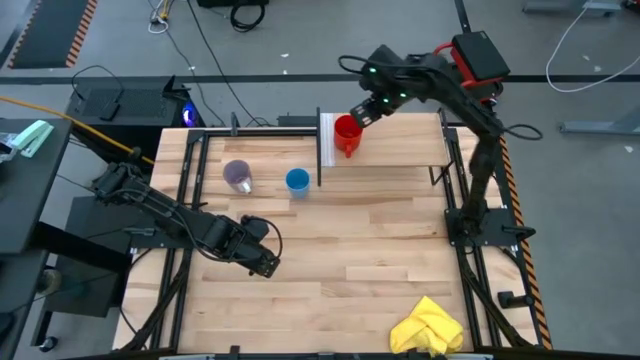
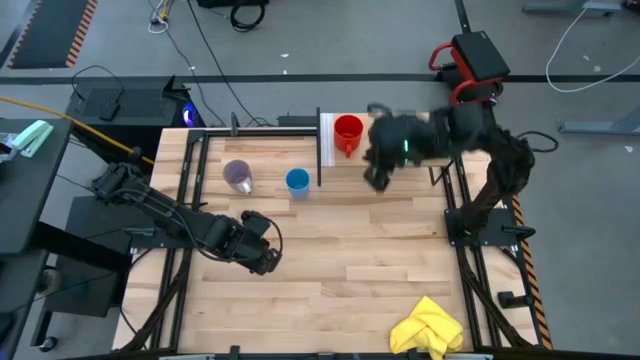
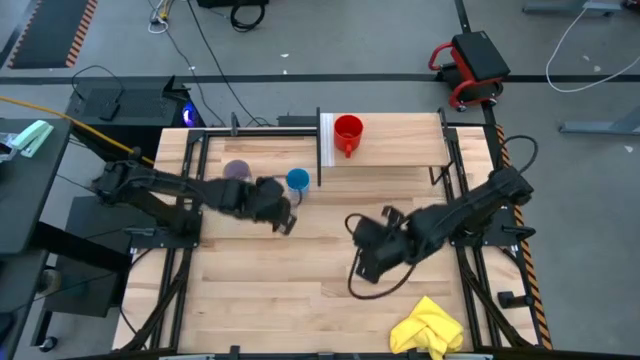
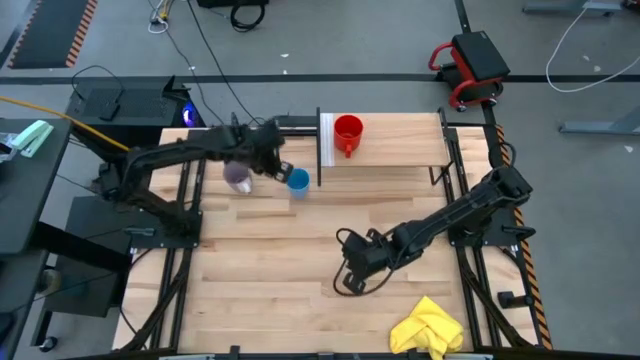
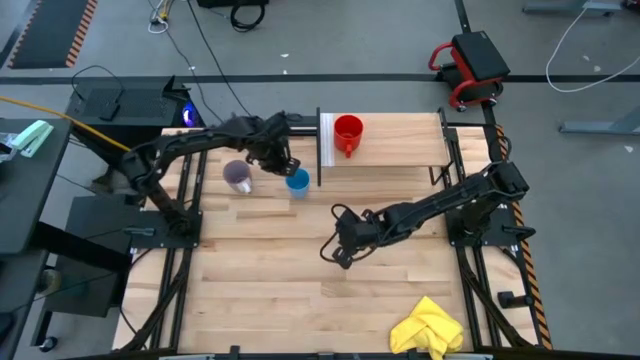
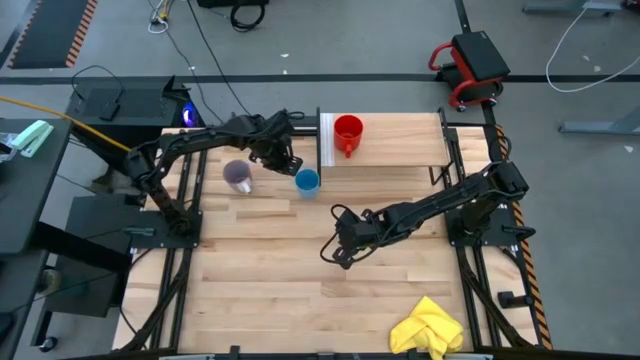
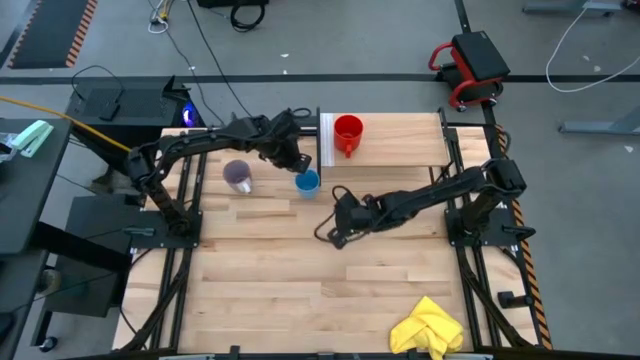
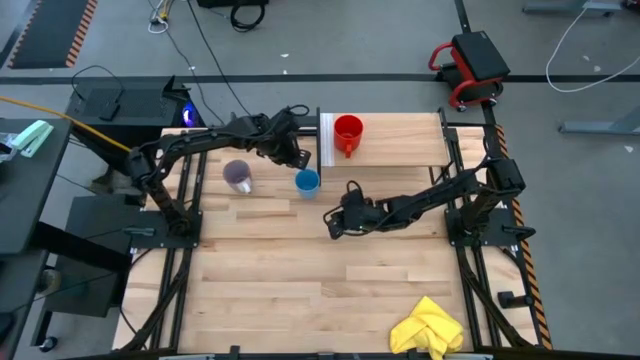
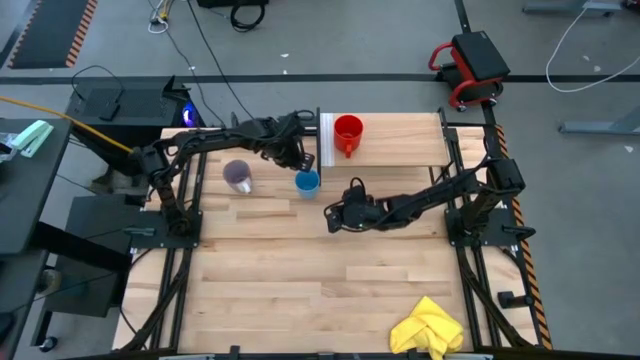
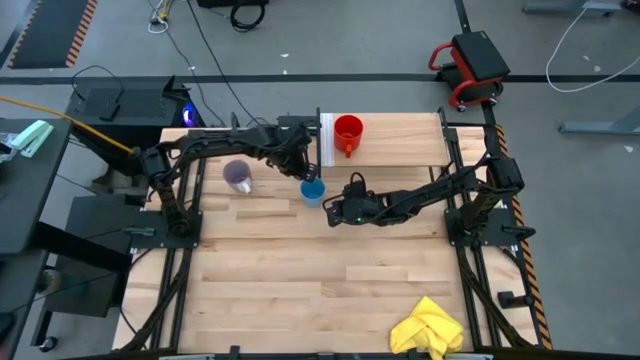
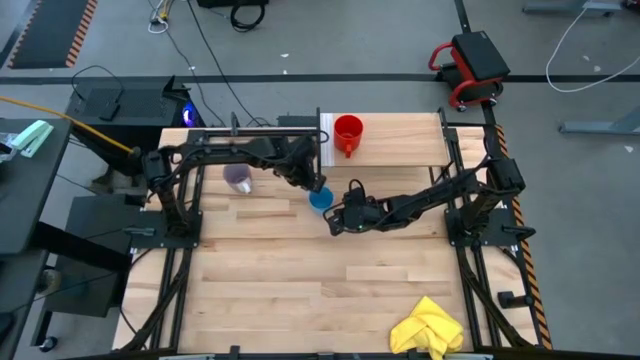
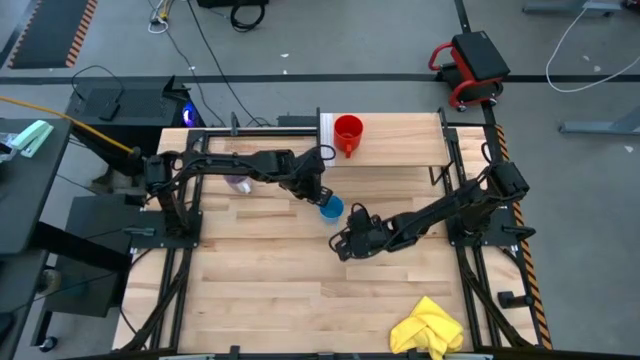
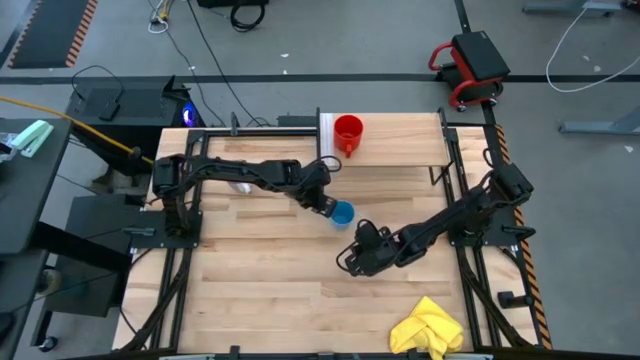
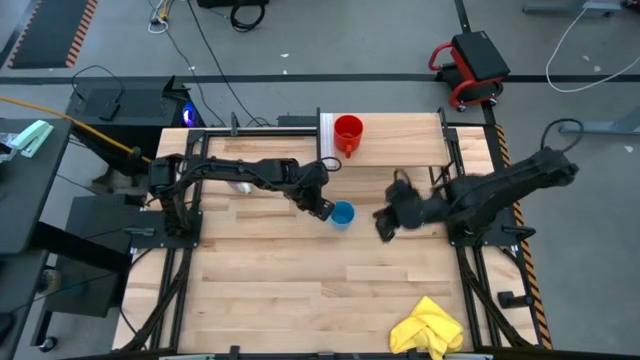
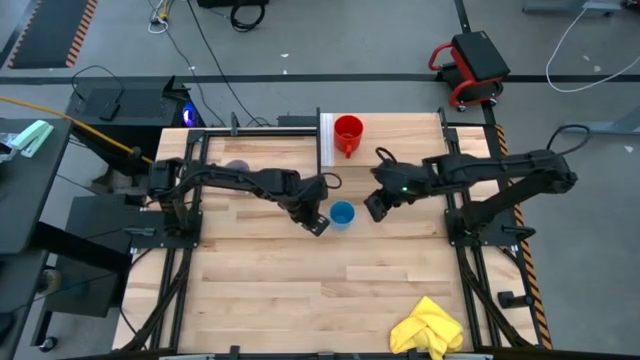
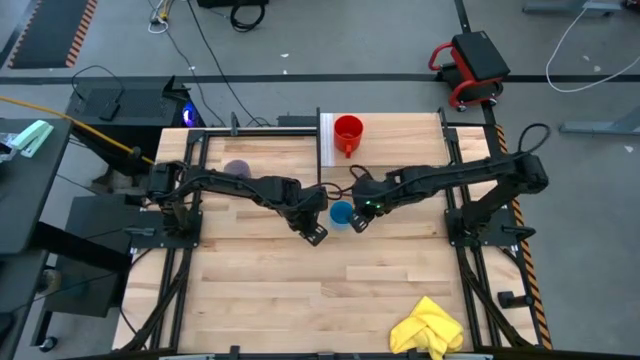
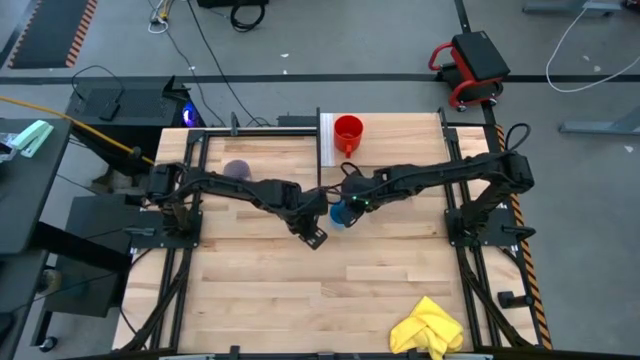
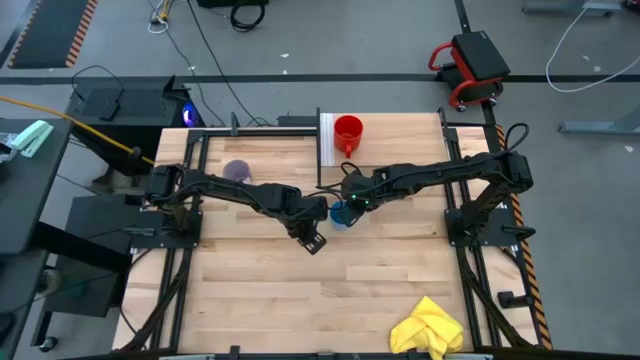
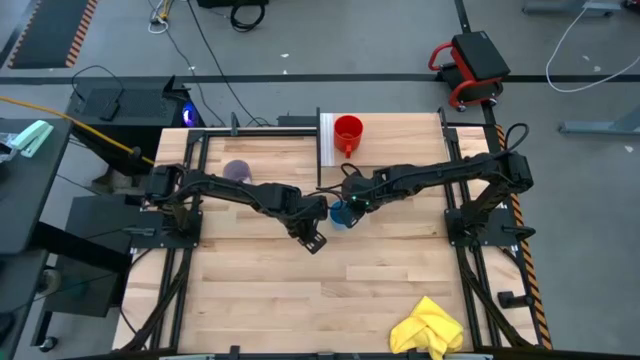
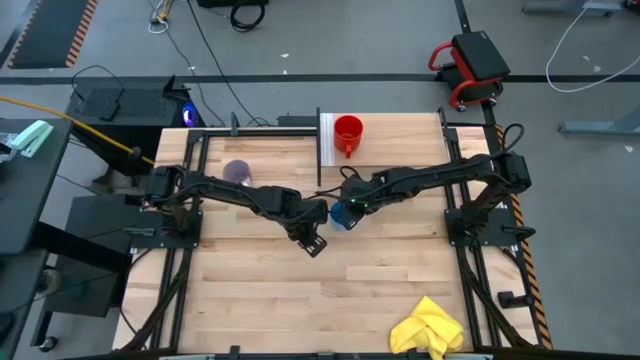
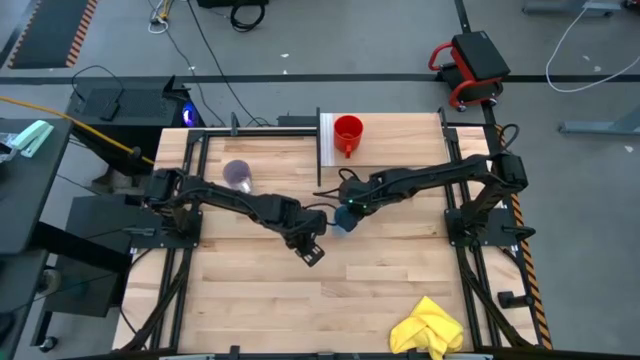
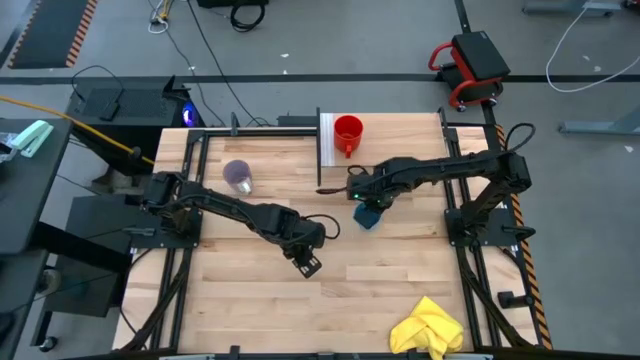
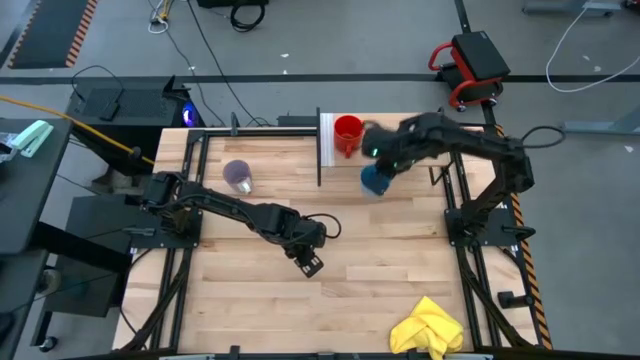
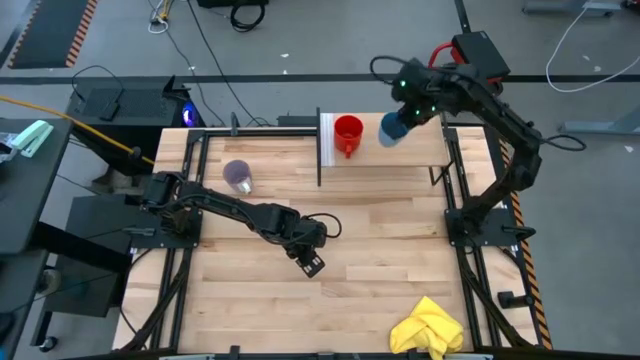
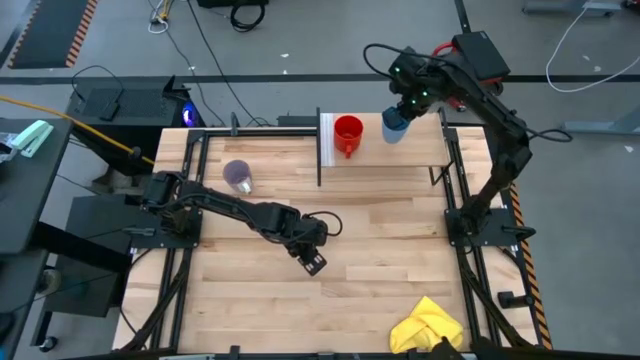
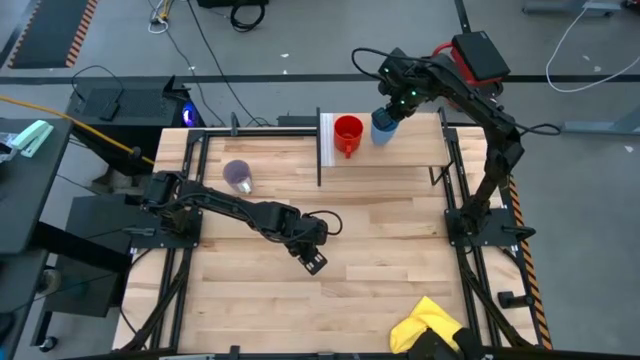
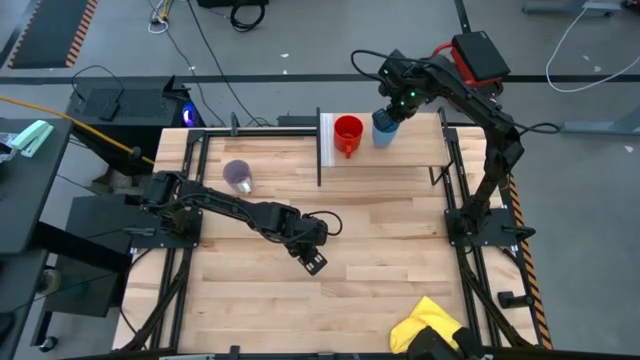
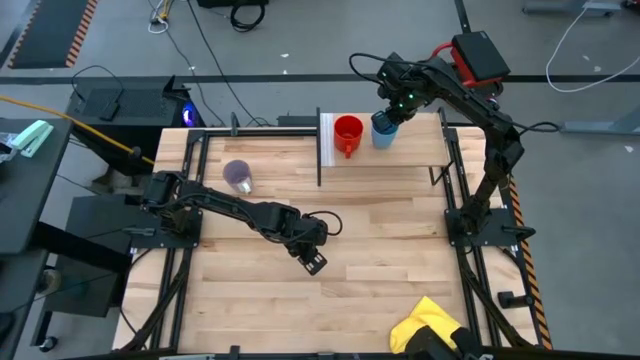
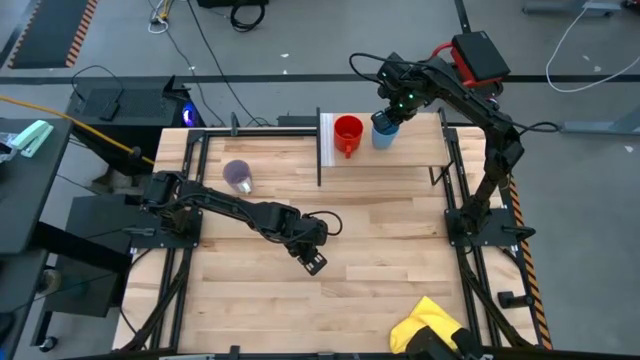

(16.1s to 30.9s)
Task: Stack small to large cups/mugs on shelf
Put the blue cup on the shelf

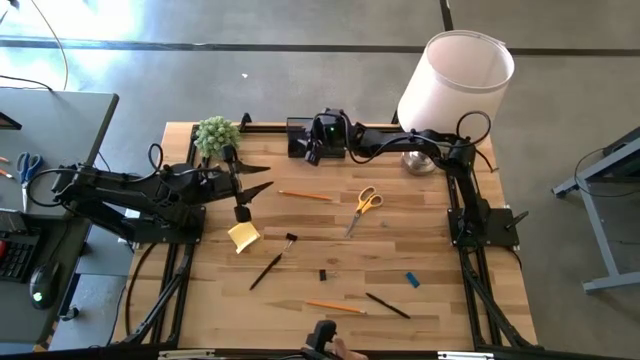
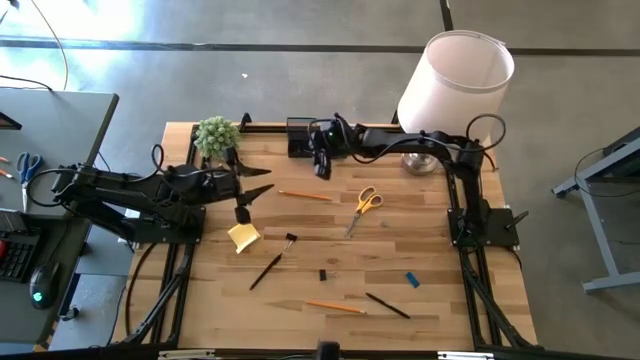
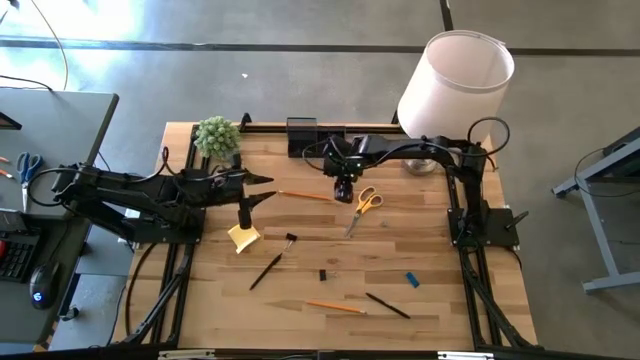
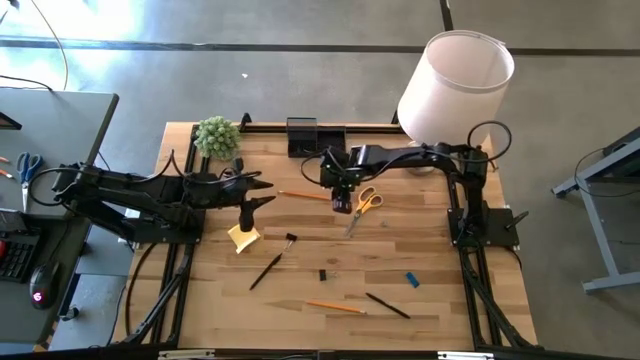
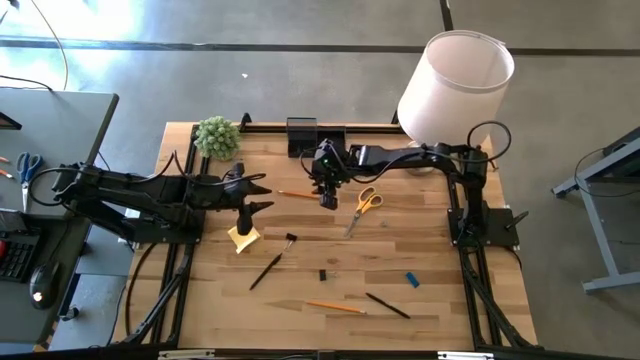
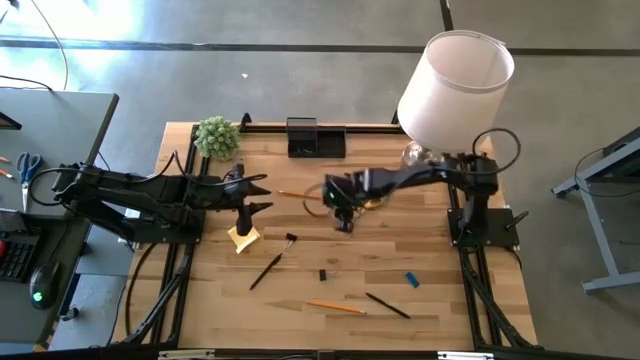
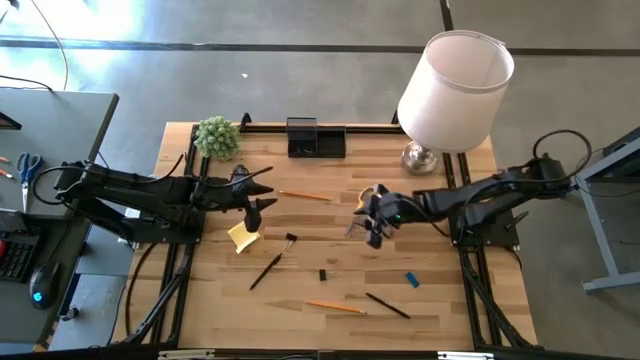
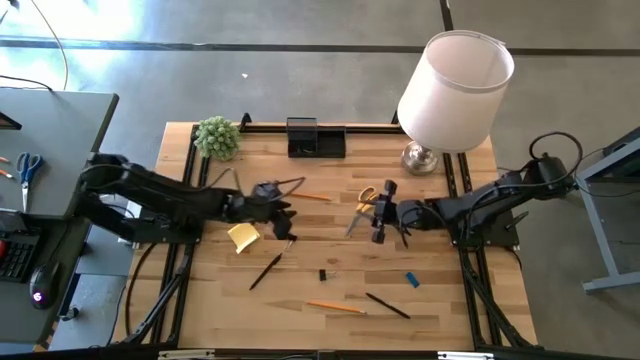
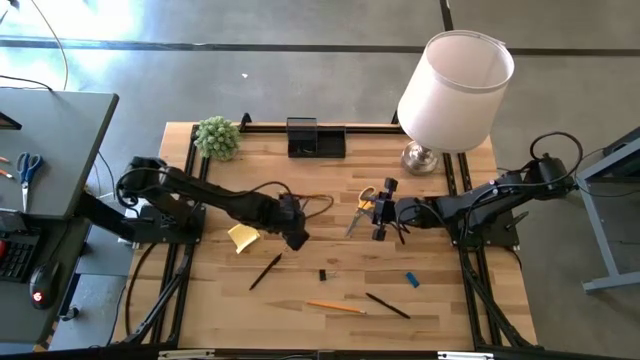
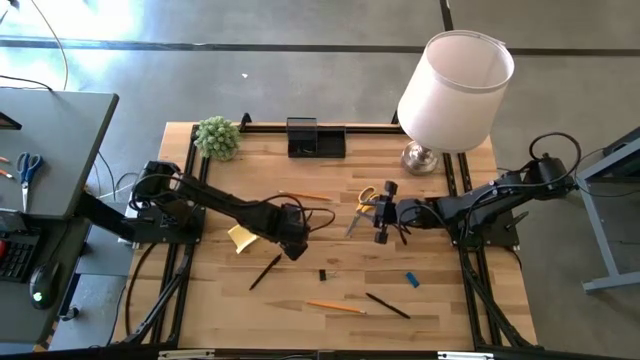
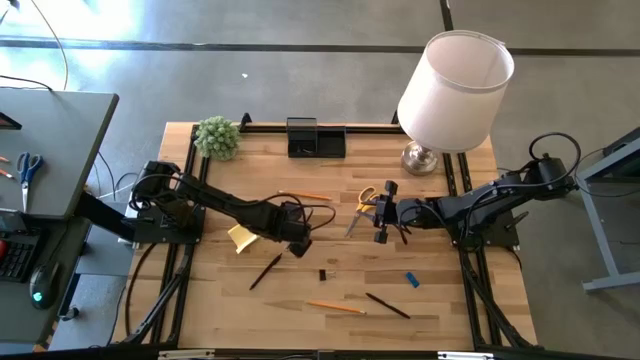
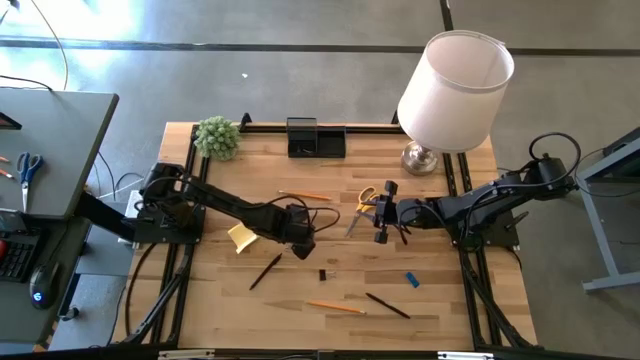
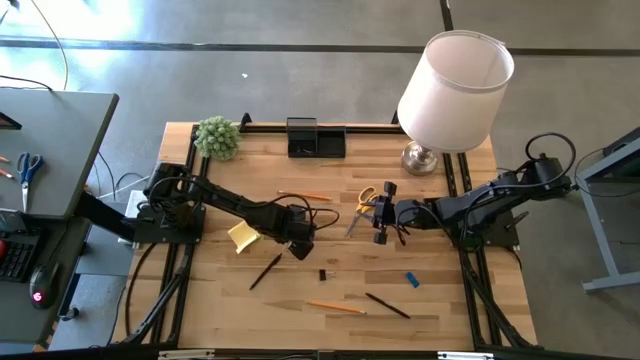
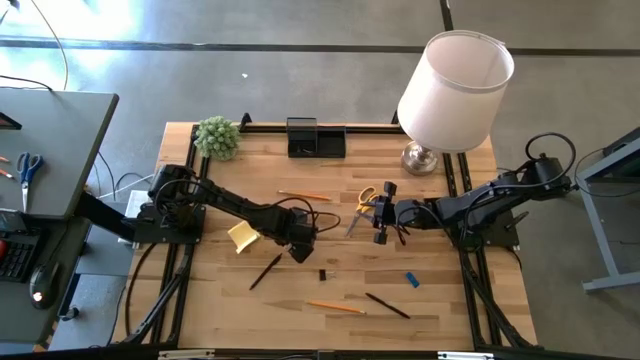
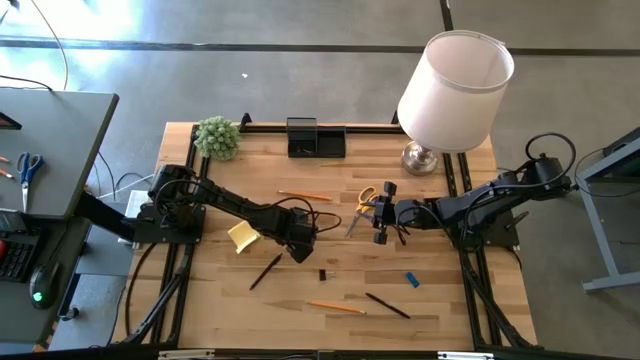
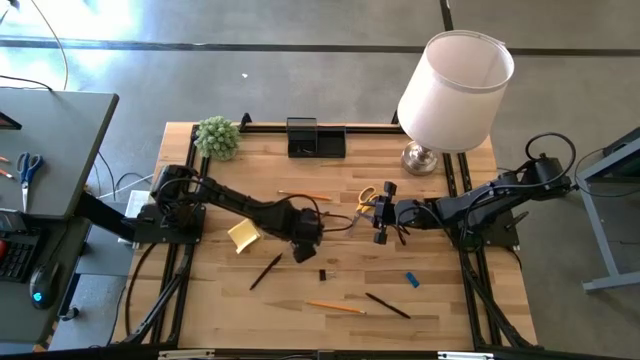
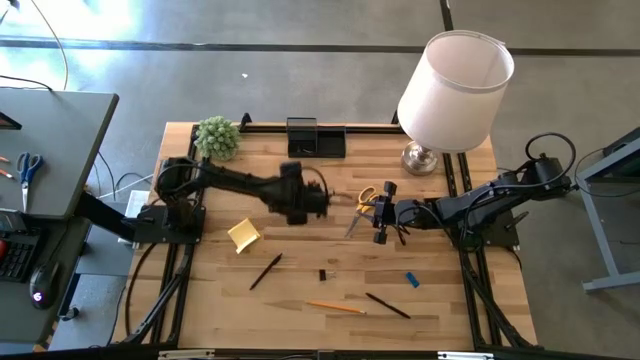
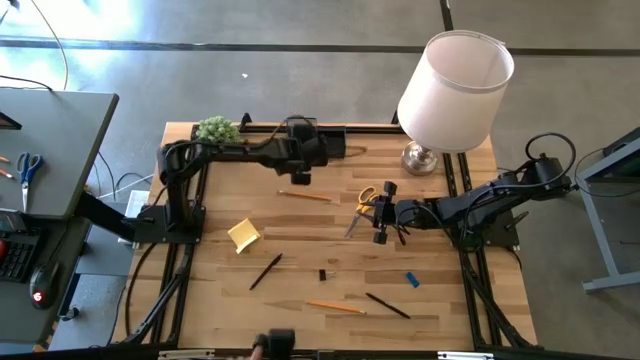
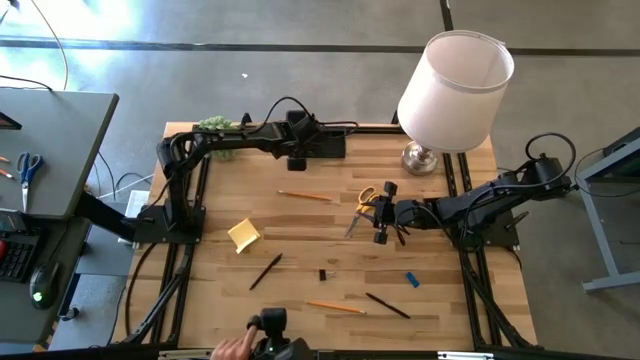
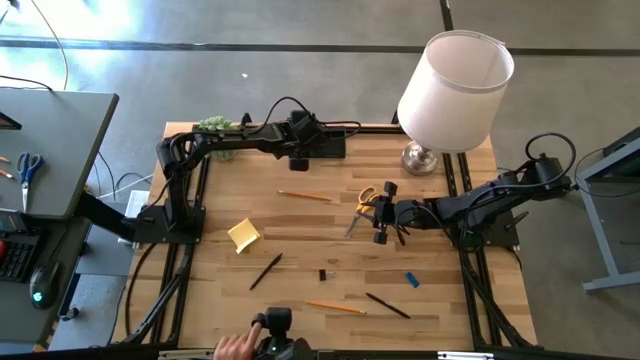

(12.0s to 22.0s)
Task: Pick and place office supplies into organizer
Put the top black binder clip into the bottom left slot of the desk organizer
